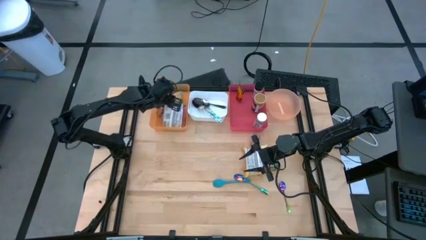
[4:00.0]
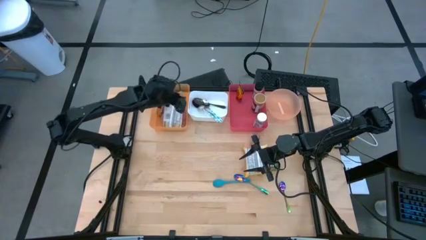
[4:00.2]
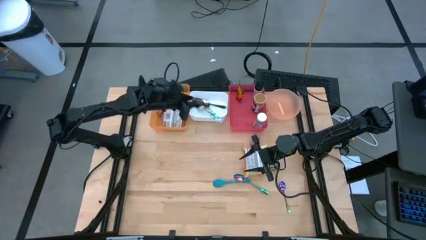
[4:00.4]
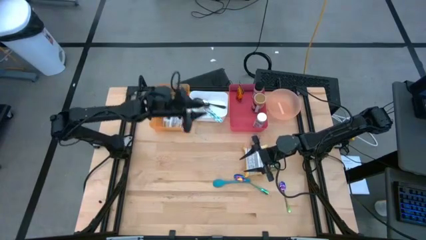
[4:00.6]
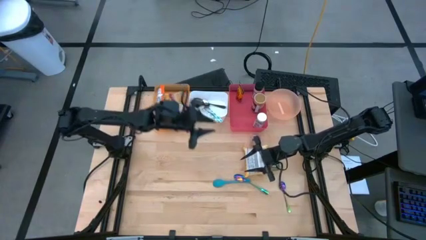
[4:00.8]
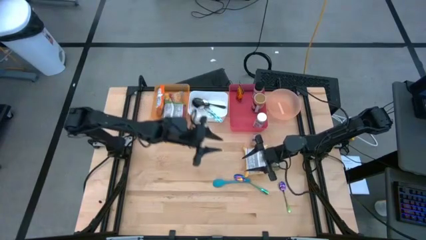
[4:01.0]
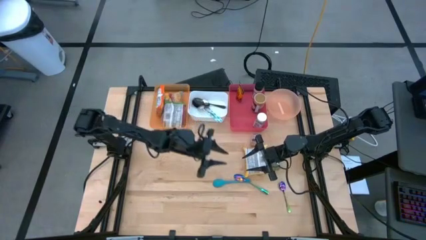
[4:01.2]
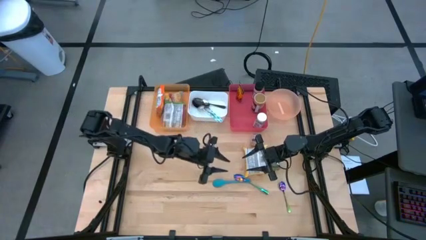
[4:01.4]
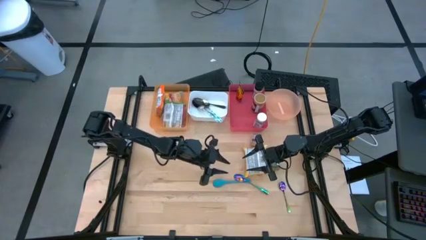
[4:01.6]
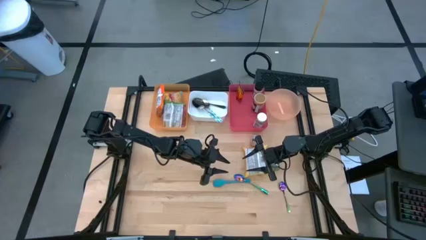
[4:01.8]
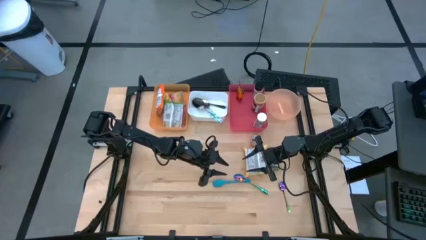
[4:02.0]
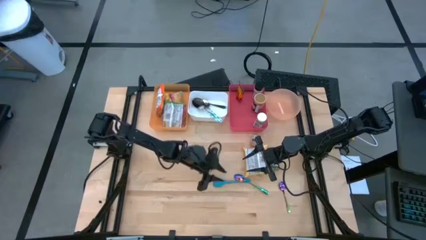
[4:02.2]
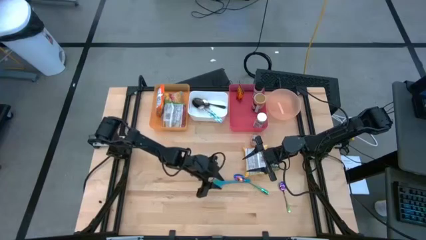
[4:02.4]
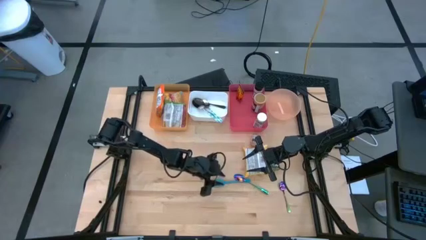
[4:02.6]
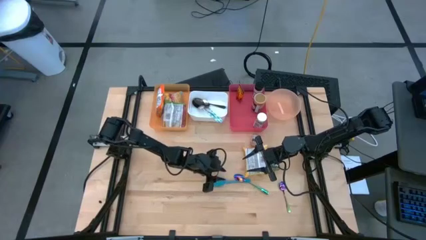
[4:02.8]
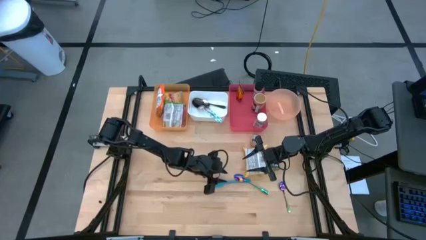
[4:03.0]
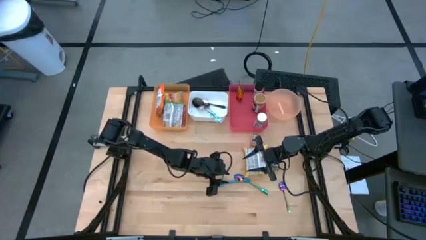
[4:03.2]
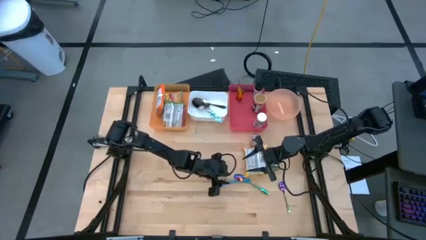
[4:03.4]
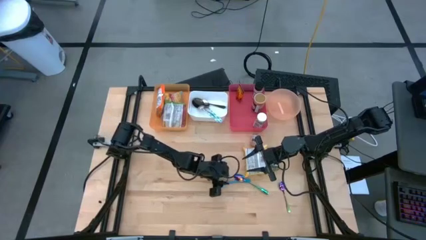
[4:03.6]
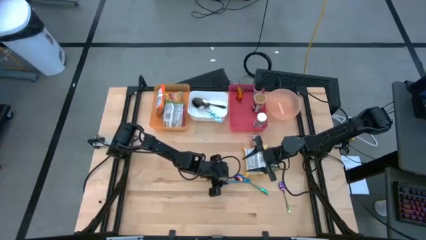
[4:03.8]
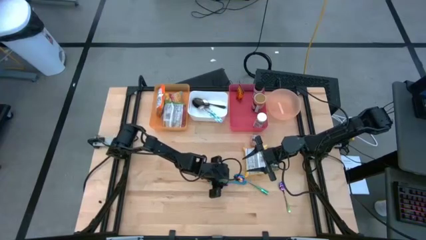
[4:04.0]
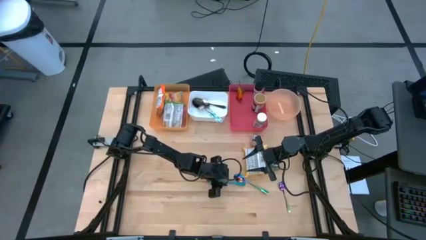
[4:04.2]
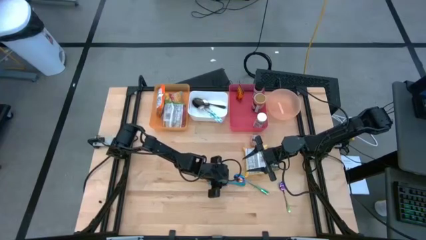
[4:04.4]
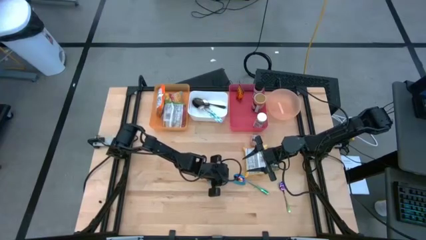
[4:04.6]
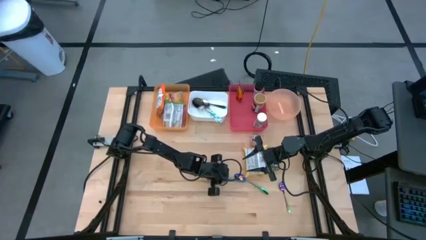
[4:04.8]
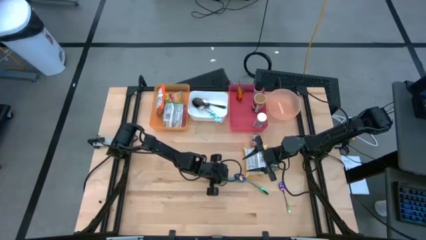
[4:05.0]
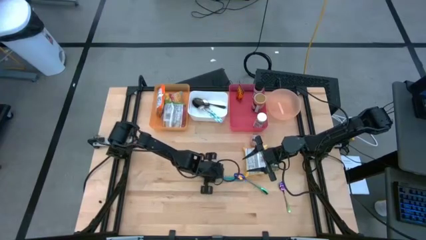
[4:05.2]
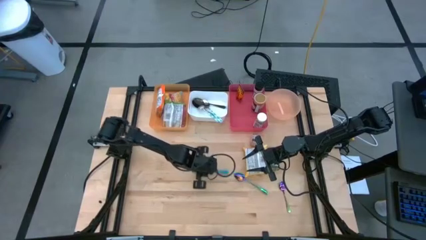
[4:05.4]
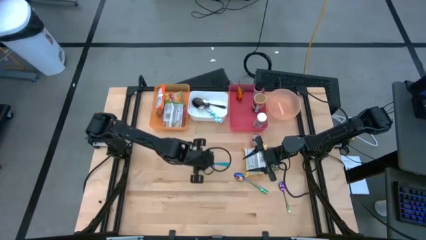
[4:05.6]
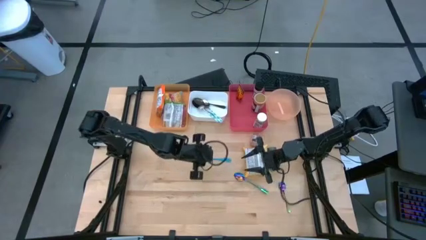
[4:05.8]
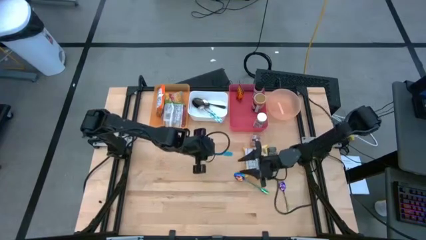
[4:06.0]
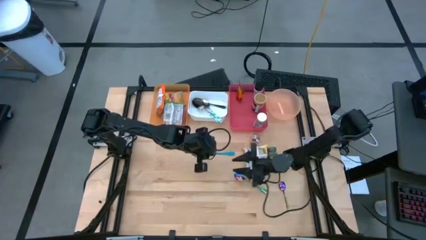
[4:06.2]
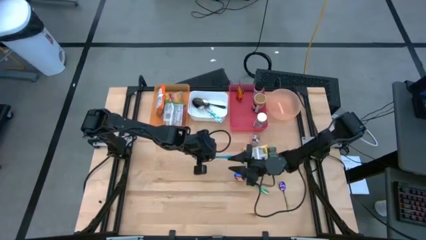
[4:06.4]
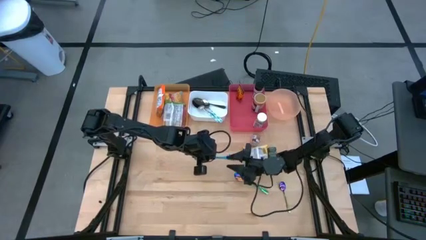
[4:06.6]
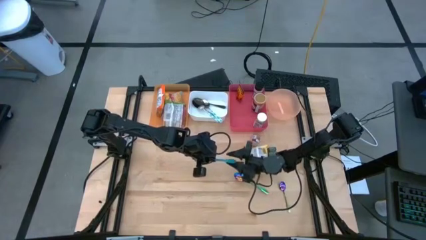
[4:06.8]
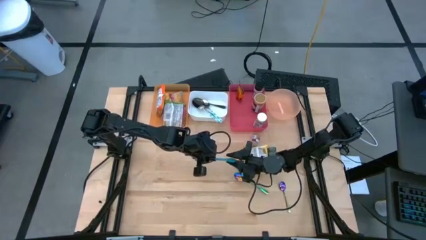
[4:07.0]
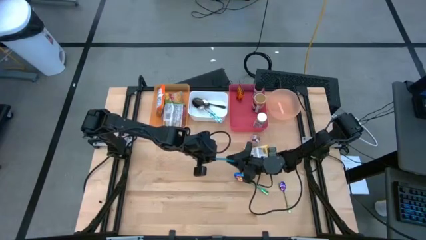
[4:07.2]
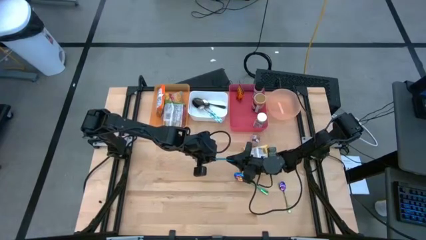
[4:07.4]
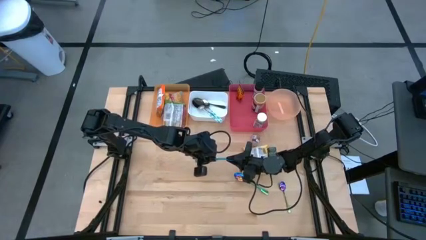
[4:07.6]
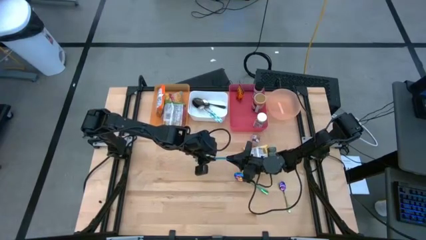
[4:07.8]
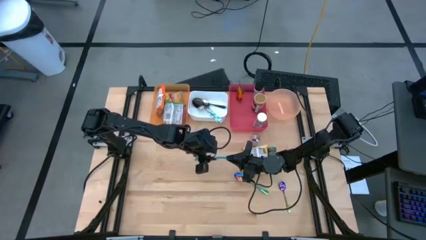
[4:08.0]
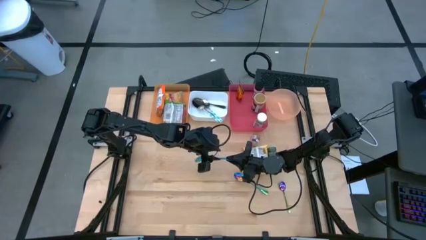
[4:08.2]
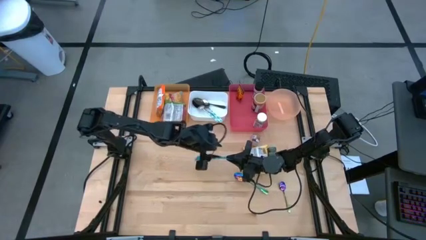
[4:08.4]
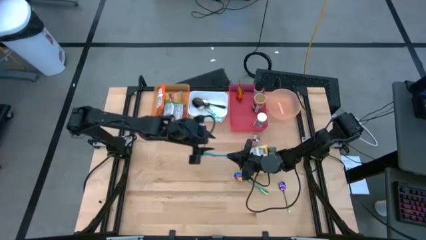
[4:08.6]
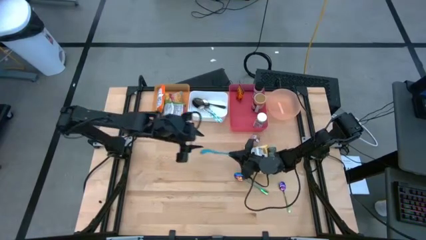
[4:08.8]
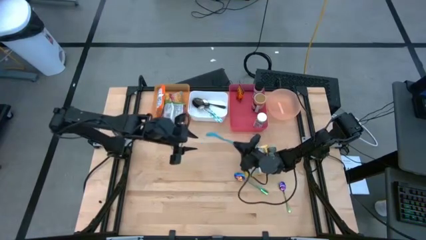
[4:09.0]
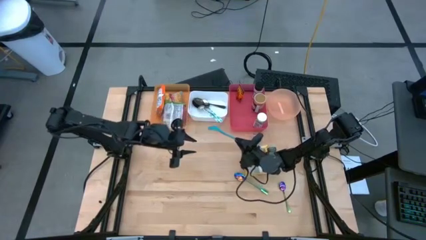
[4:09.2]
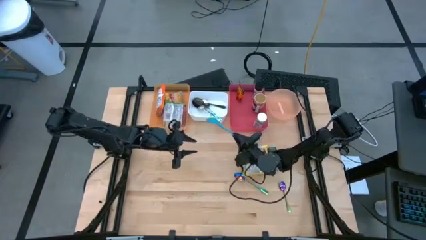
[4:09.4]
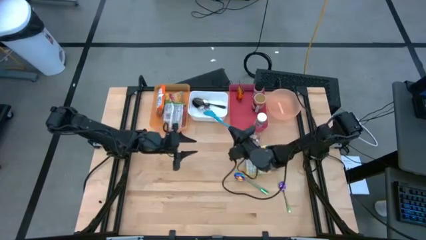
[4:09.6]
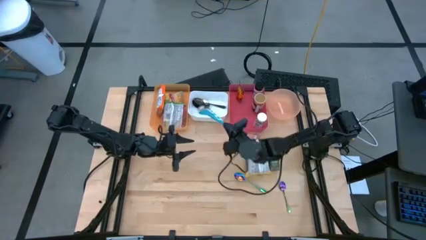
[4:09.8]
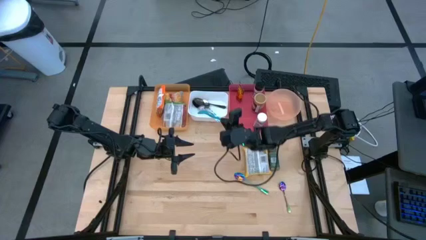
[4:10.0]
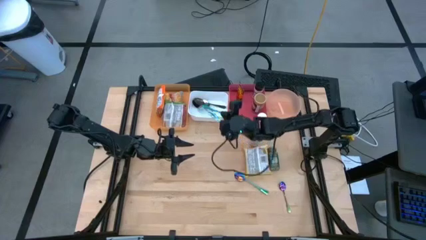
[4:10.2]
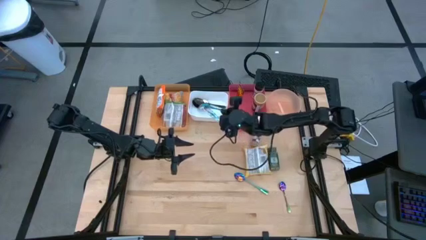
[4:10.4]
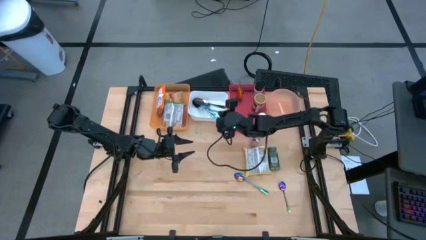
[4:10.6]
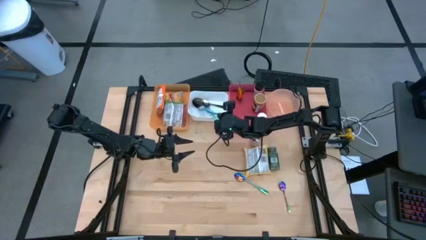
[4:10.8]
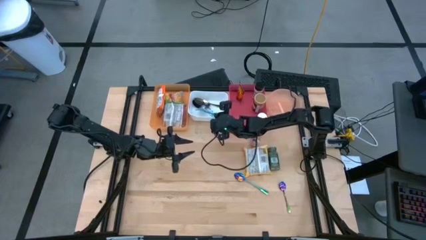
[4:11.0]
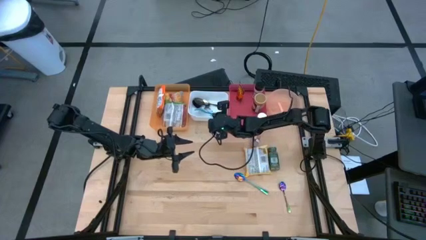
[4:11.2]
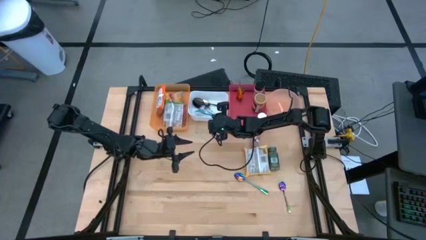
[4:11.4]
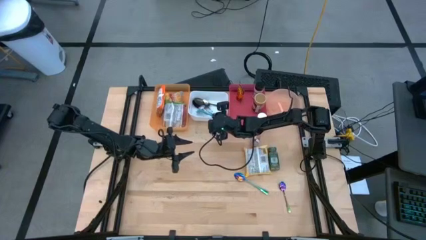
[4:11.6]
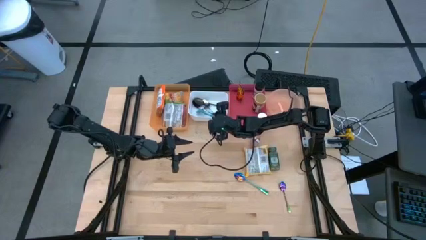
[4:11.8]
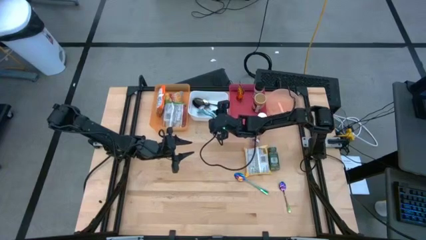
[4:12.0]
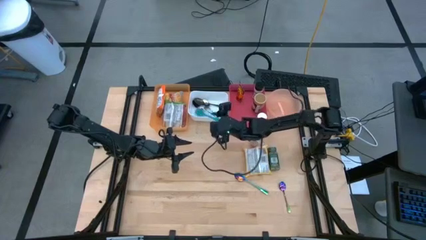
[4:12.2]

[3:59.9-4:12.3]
Task: Pick & Place Food Item
Put the blue spoon into the white bin
